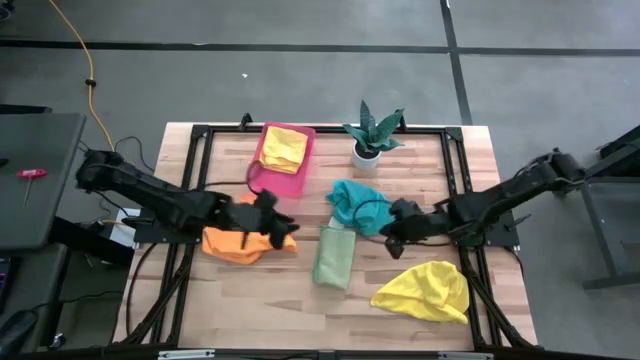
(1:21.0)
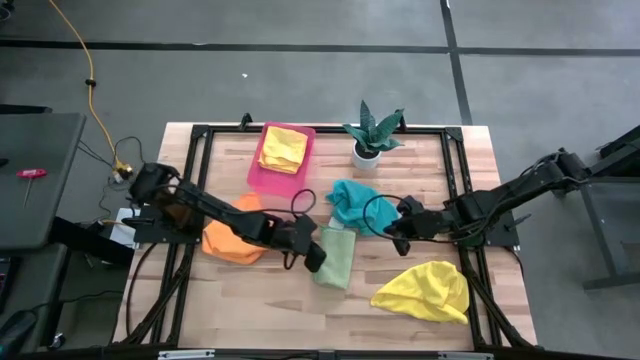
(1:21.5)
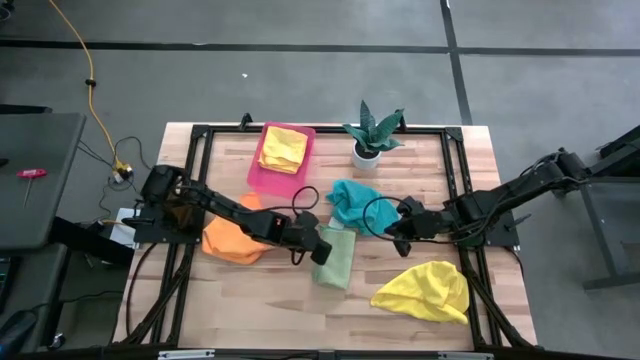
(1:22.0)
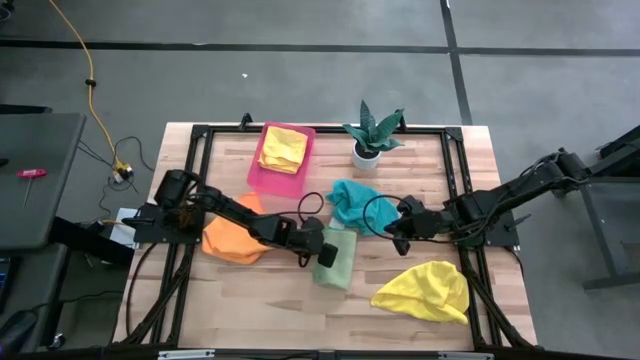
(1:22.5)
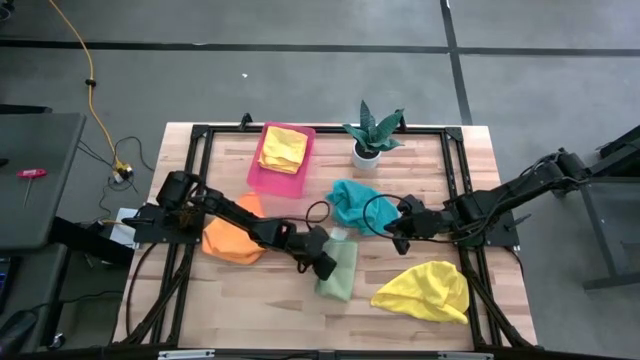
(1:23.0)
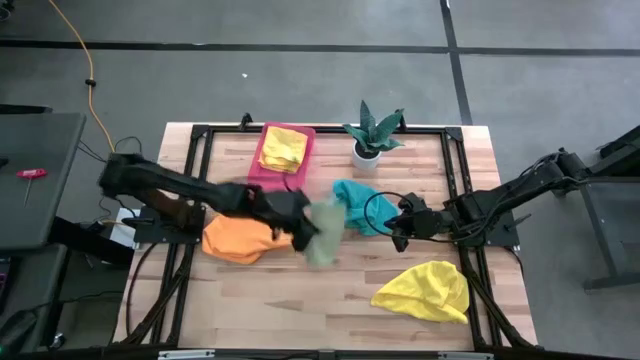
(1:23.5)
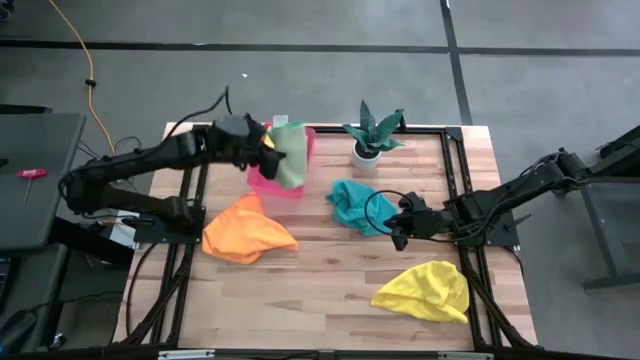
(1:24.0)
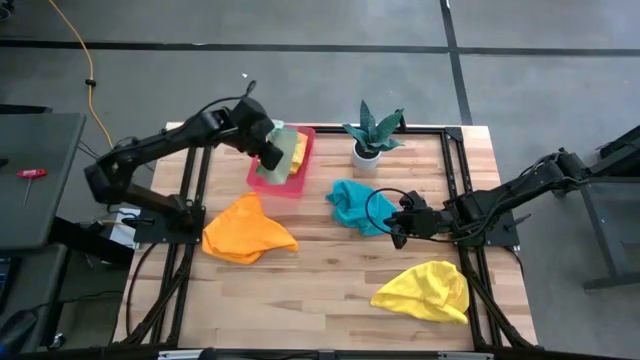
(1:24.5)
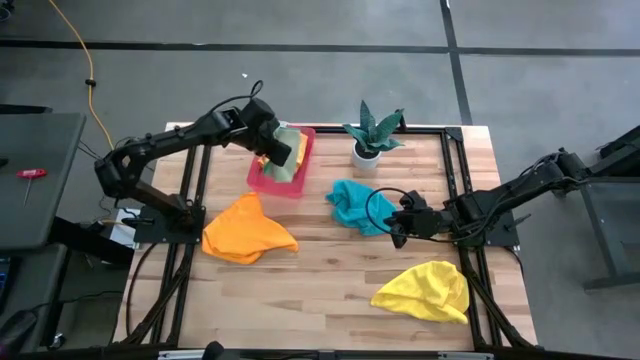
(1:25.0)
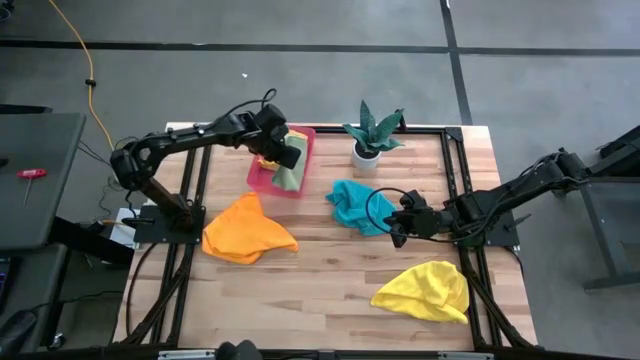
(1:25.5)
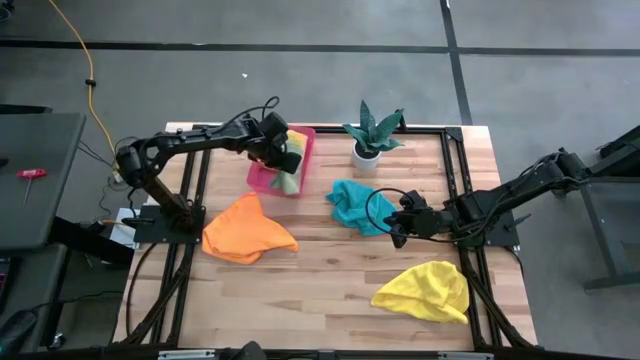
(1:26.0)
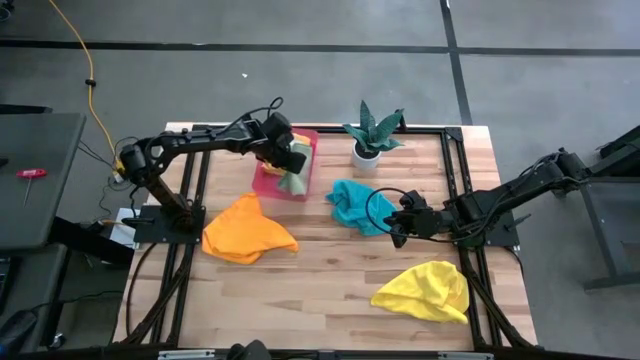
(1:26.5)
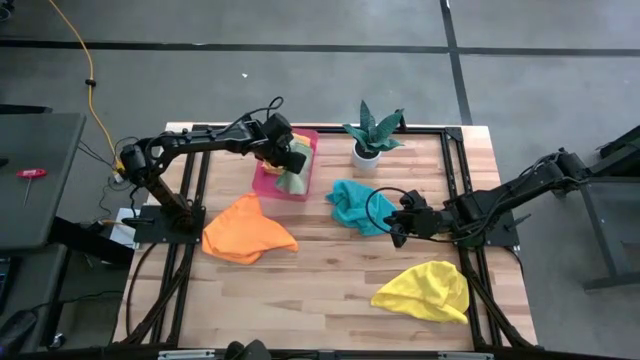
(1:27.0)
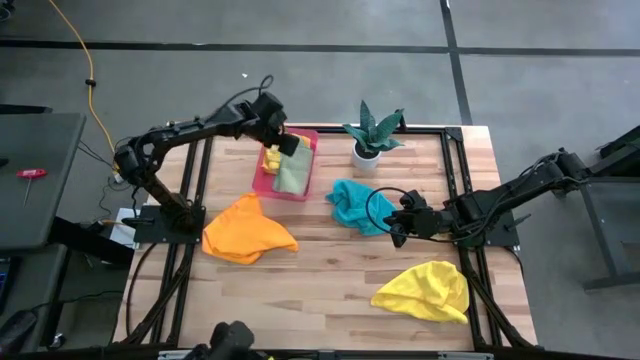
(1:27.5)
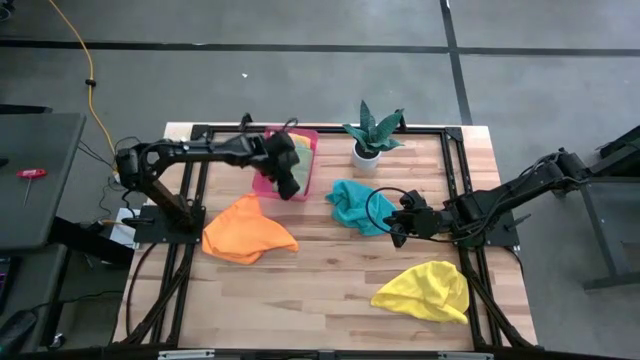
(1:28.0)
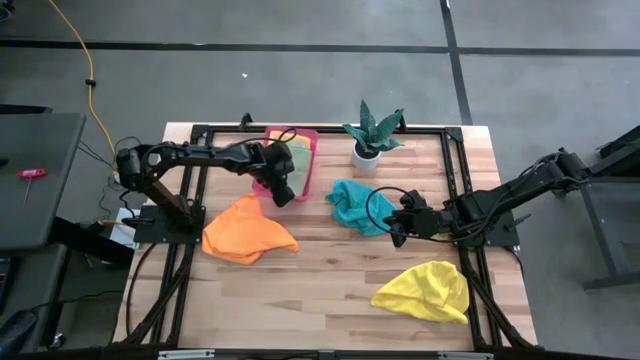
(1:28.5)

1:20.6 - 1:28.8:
Task: Fold microfiber towels
Put the folded green microfiber cloth into the red bin

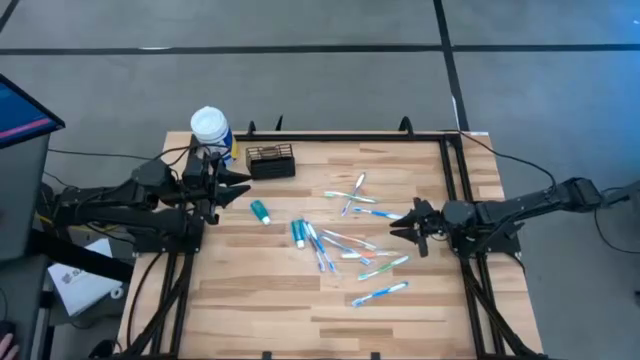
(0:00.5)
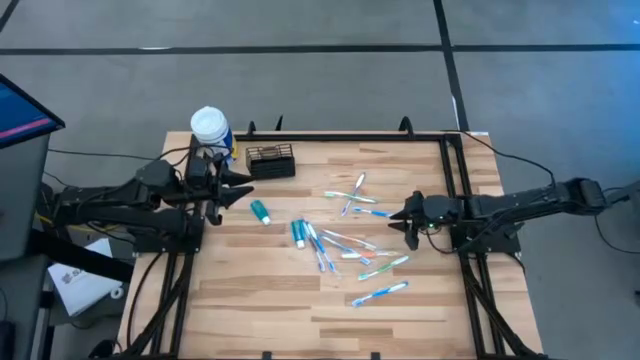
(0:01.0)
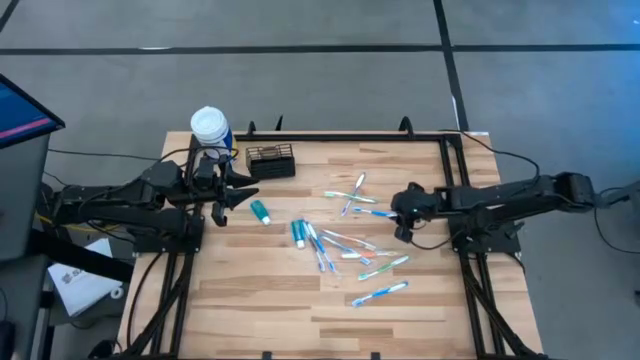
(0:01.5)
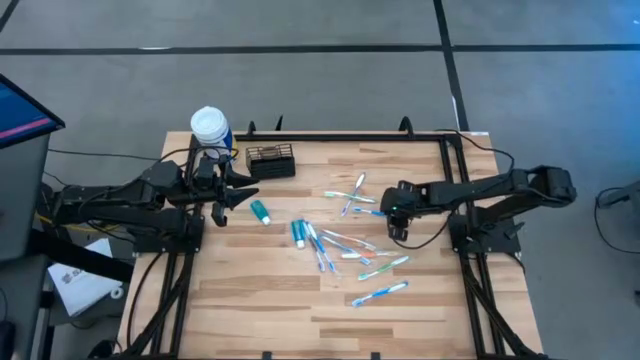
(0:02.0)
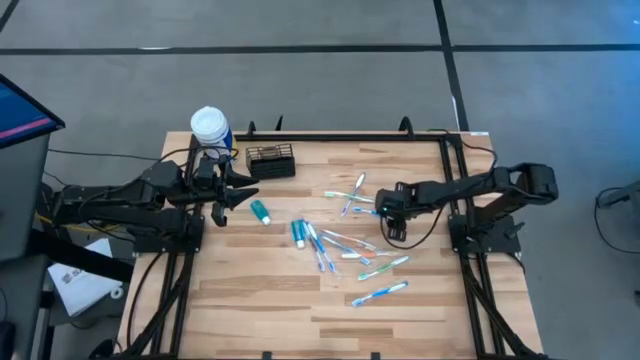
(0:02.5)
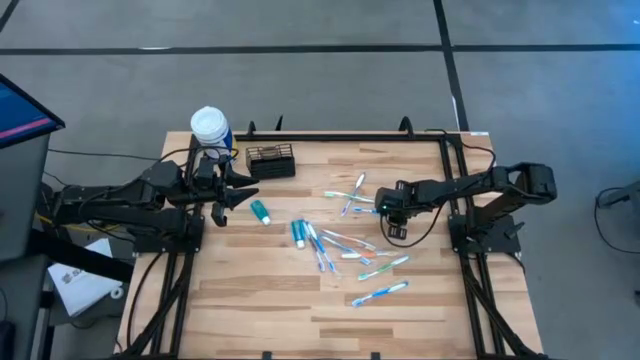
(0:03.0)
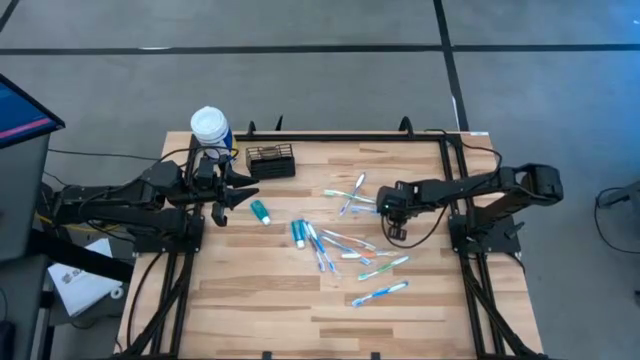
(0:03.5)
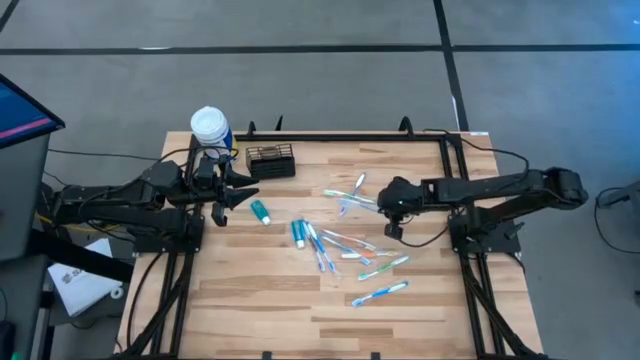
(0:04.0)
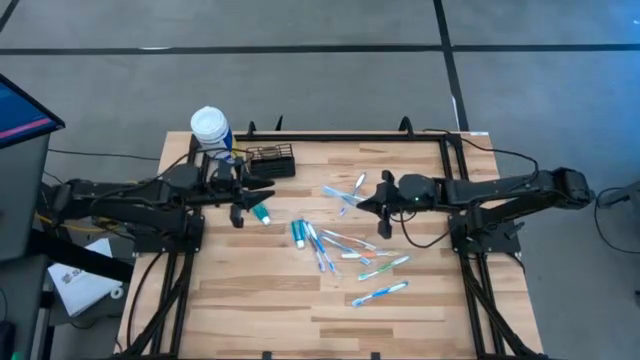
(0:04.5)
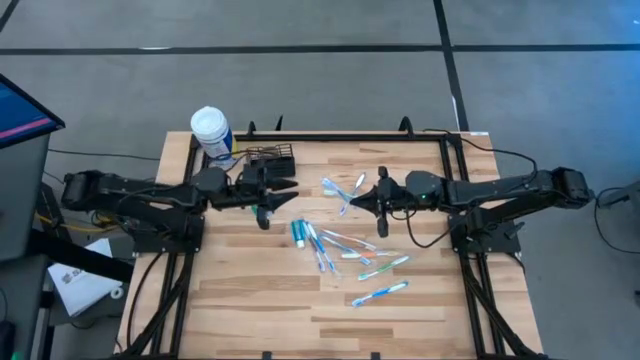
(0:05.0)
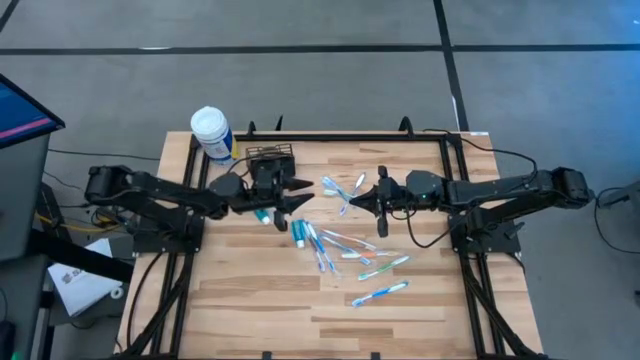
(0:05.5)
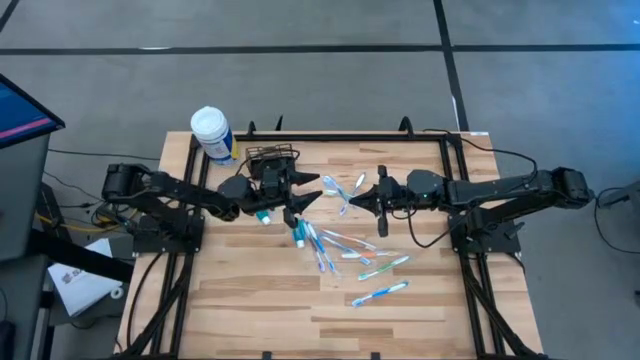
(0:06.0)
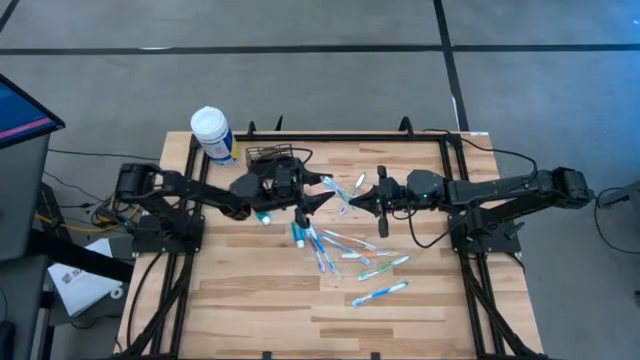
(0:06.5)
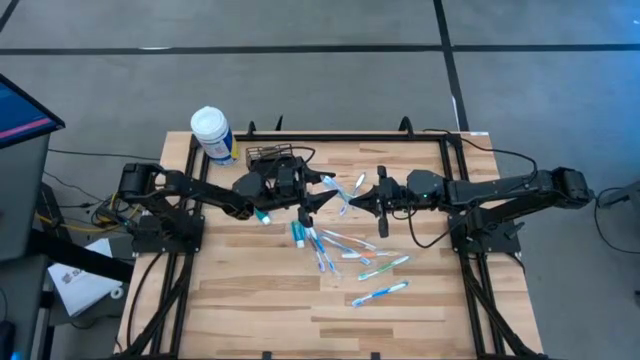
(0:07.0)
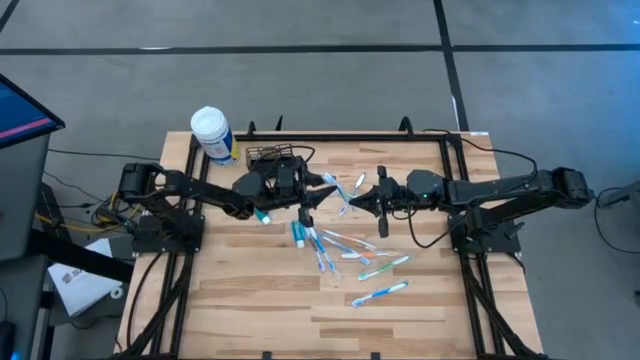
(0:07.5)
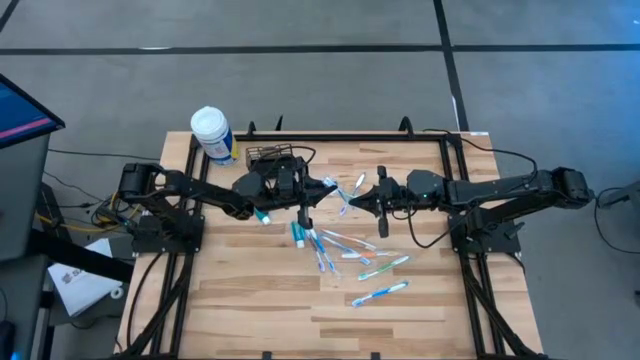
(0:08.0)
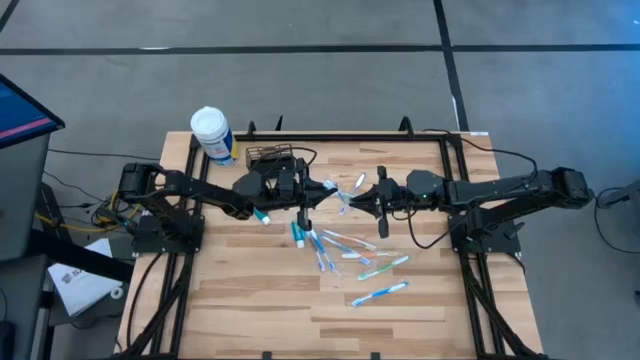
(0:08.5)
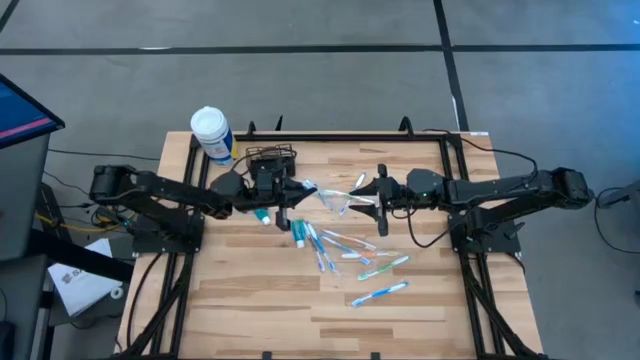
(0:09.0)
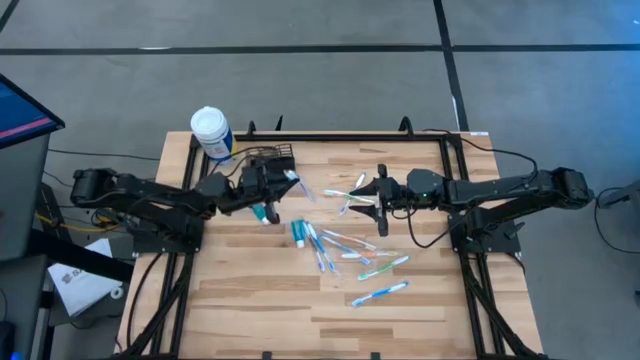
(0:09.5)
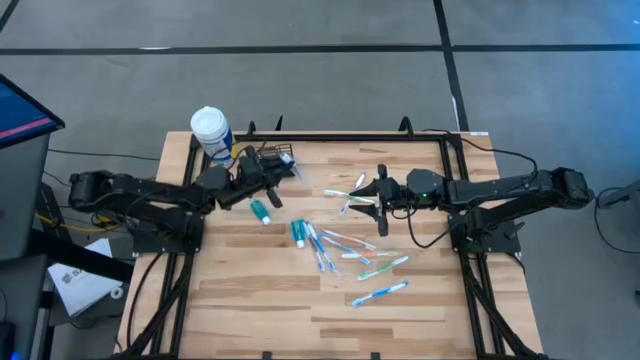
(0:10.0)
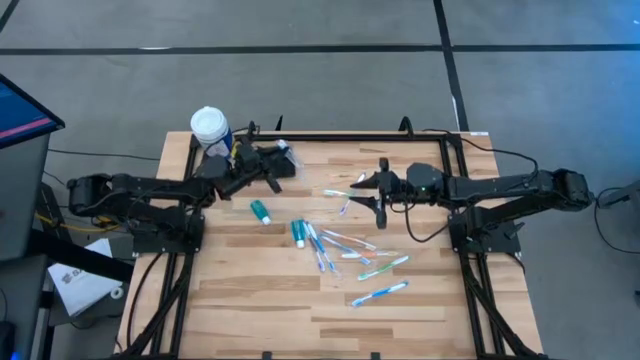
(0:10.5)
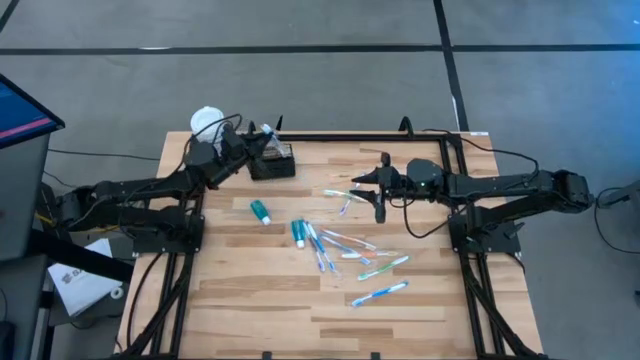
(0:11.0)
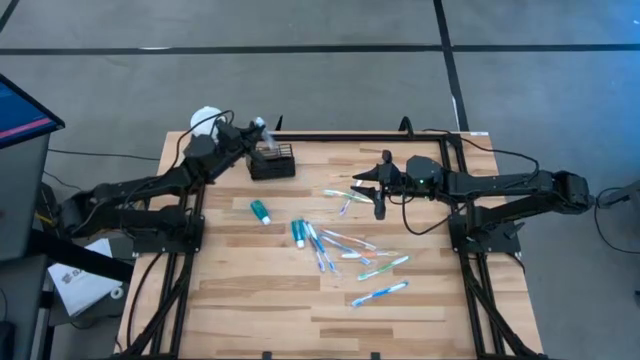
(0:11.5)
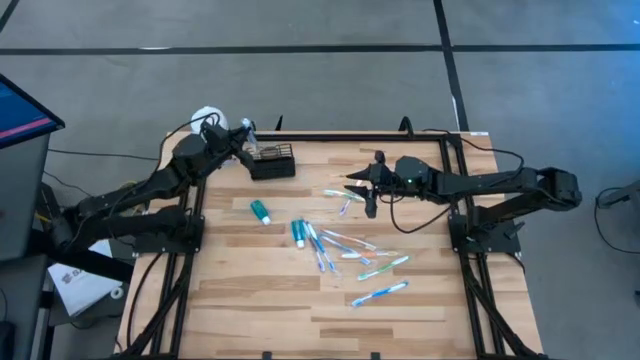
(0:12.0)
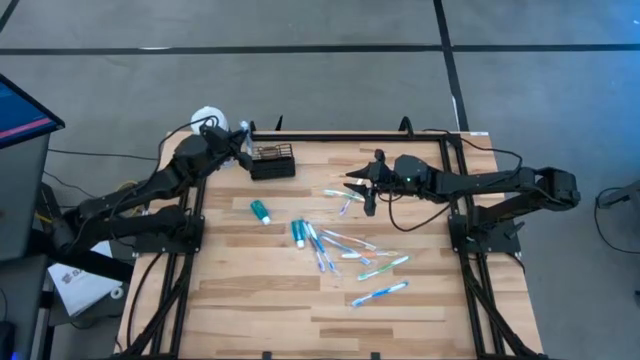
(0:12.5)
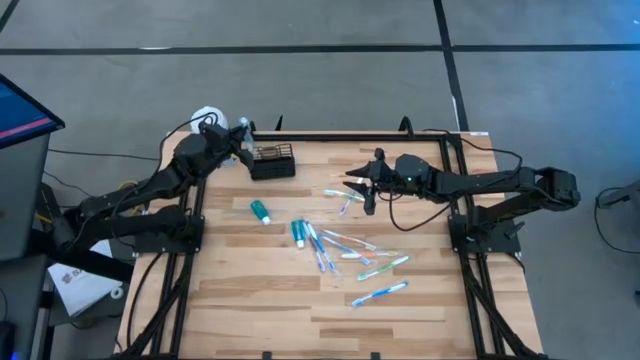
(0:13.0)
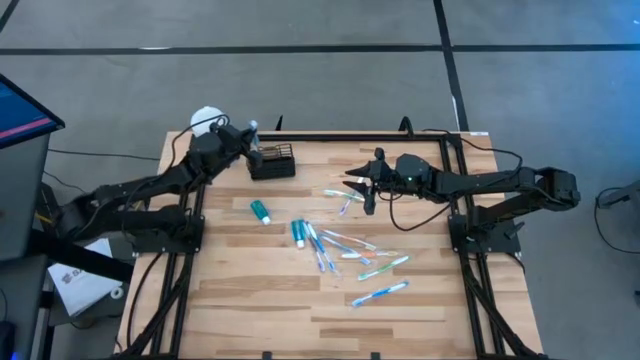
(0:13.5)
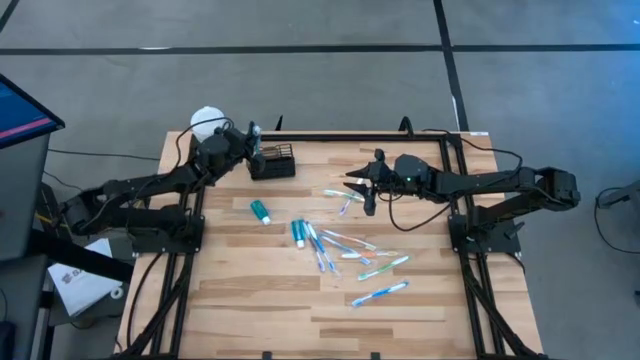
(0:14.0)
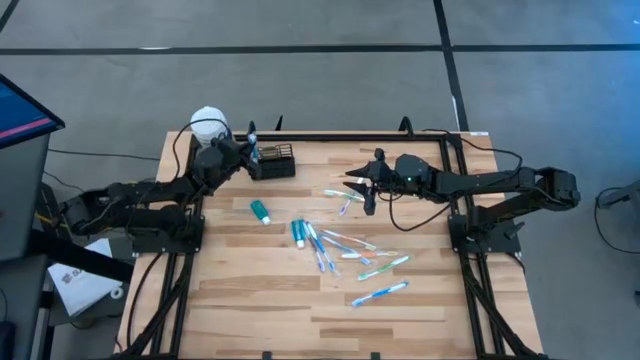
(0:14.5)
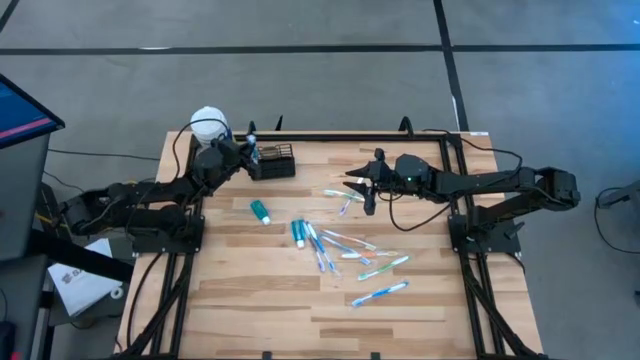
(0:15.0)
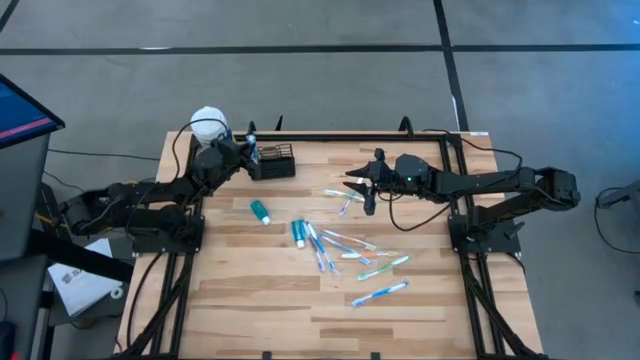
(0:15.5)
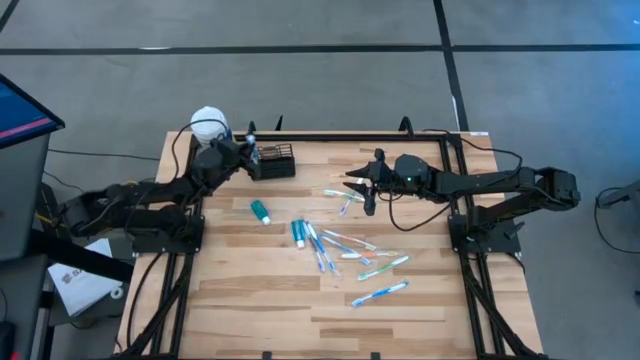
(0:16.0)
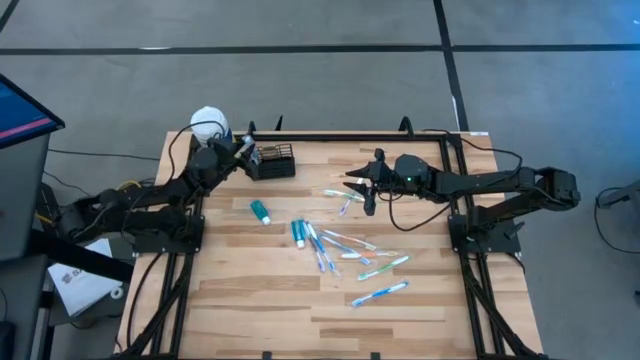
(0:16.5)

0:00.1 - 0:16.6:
Task: Pick & Place toothbrushing station
Put the blue toothbrush into the black wire organizer
